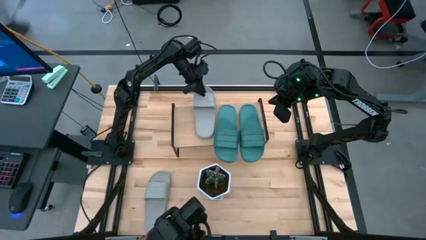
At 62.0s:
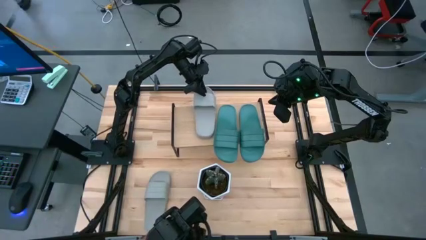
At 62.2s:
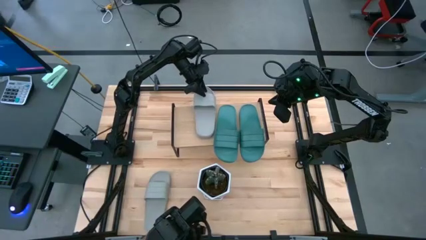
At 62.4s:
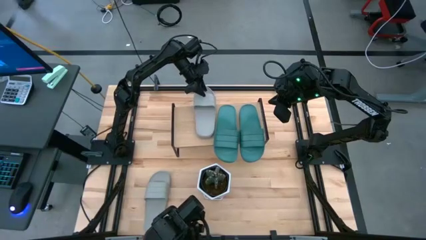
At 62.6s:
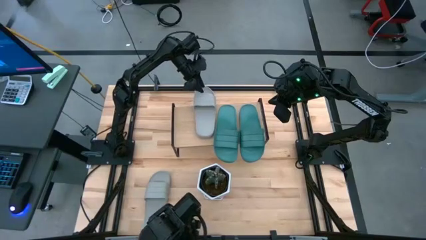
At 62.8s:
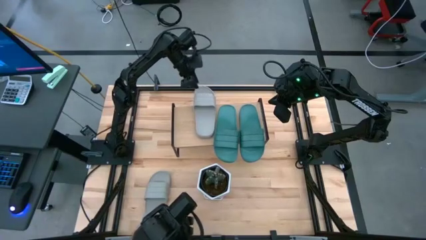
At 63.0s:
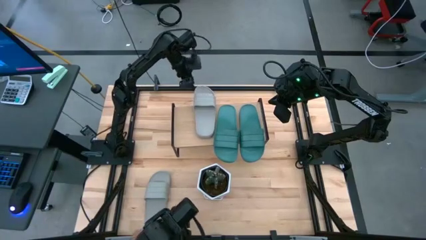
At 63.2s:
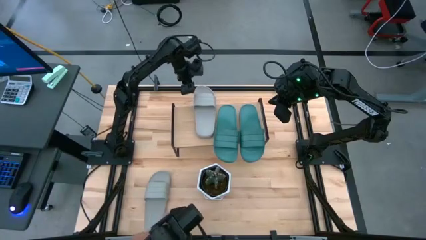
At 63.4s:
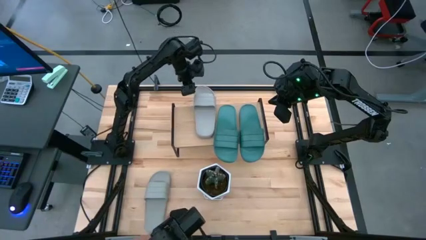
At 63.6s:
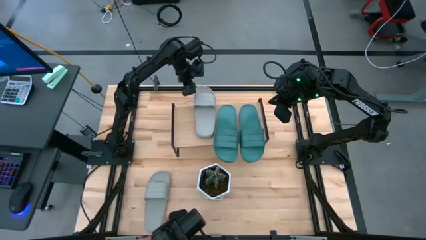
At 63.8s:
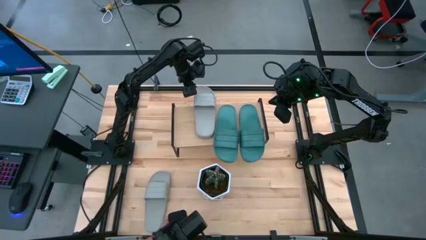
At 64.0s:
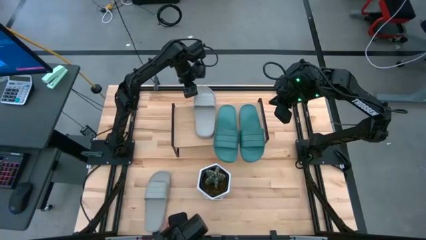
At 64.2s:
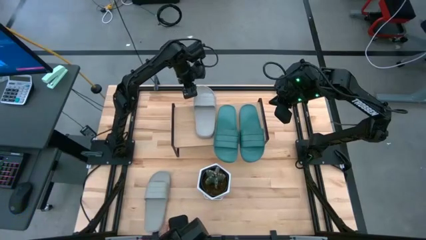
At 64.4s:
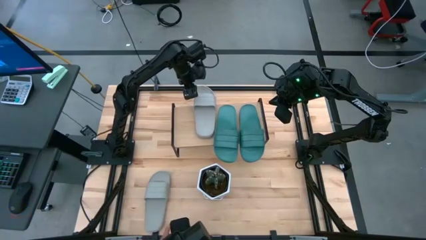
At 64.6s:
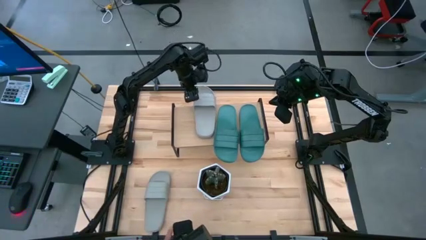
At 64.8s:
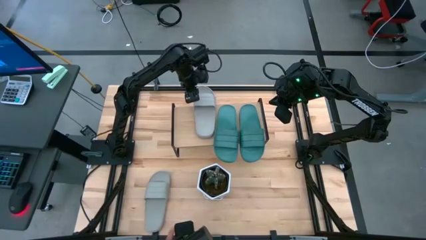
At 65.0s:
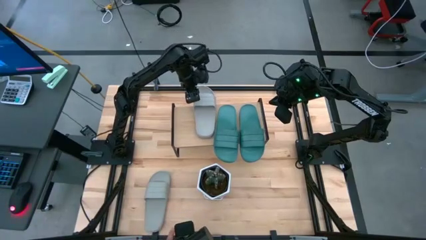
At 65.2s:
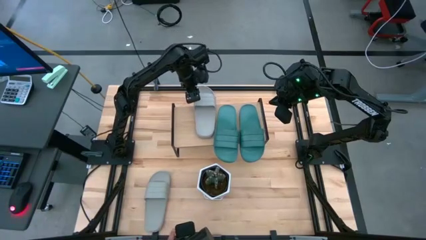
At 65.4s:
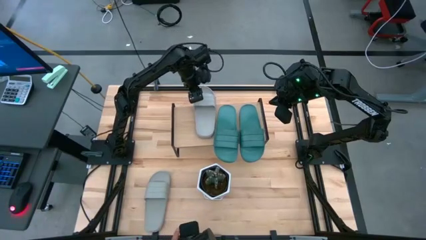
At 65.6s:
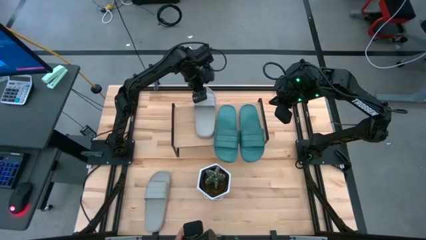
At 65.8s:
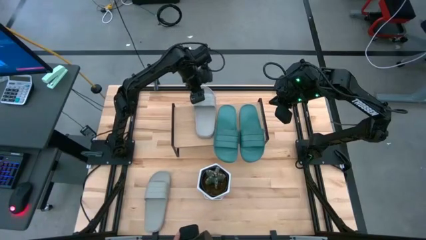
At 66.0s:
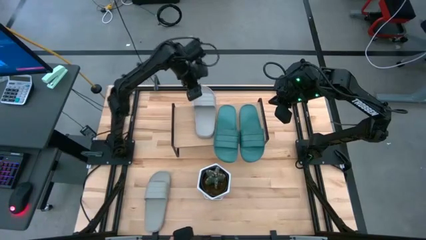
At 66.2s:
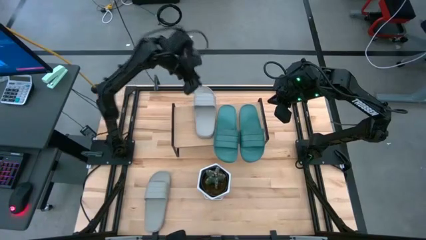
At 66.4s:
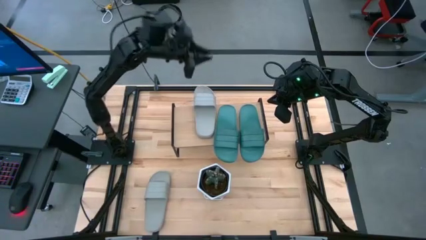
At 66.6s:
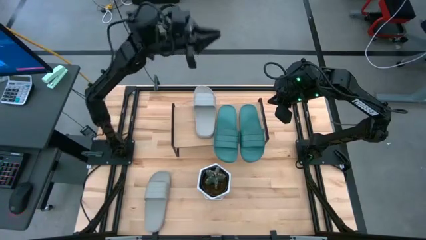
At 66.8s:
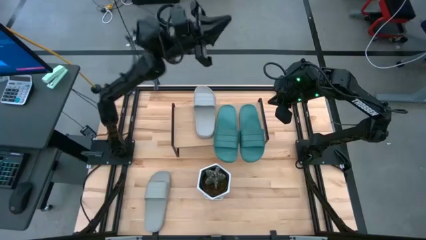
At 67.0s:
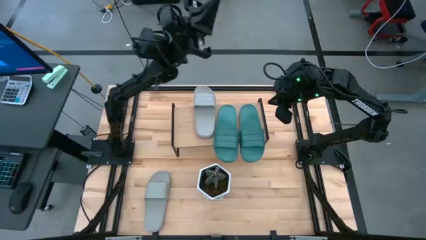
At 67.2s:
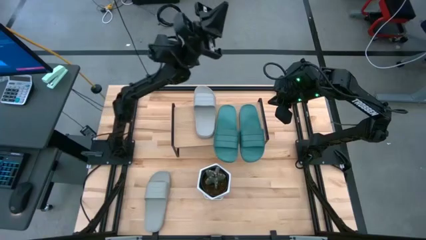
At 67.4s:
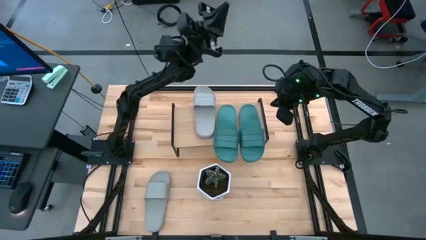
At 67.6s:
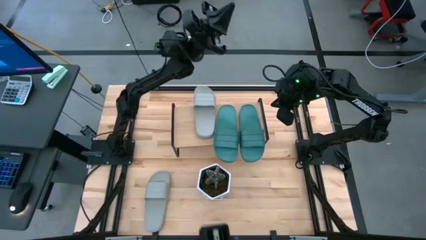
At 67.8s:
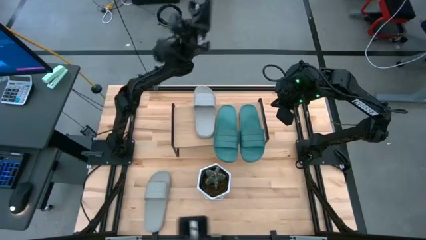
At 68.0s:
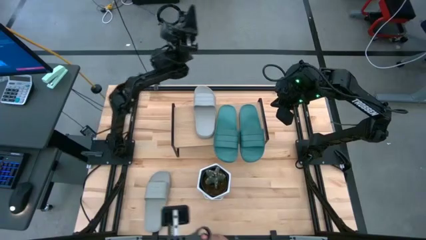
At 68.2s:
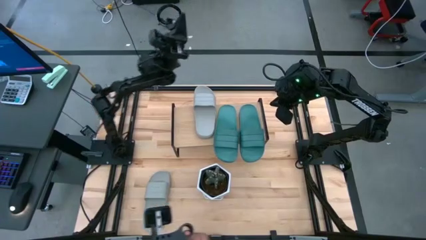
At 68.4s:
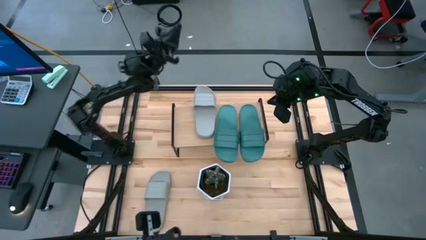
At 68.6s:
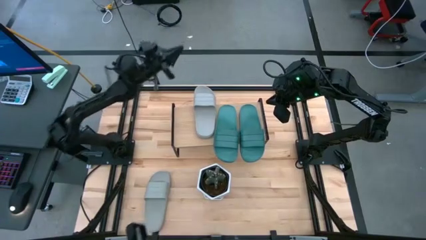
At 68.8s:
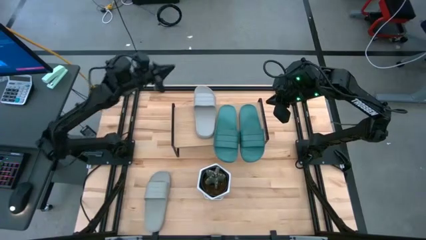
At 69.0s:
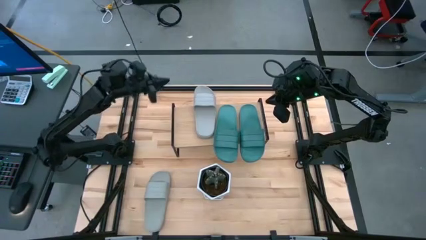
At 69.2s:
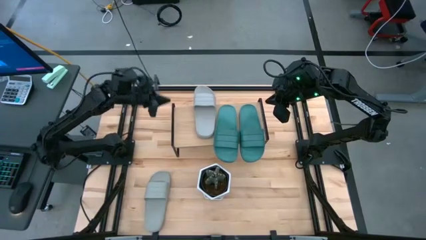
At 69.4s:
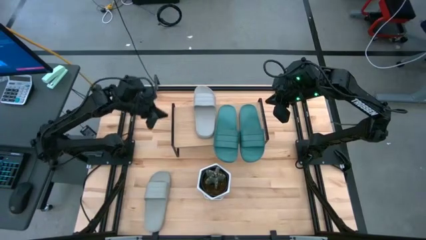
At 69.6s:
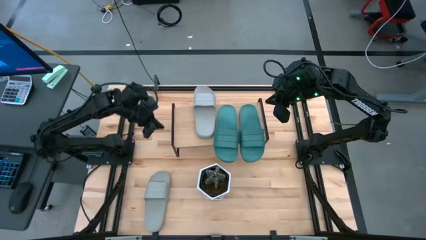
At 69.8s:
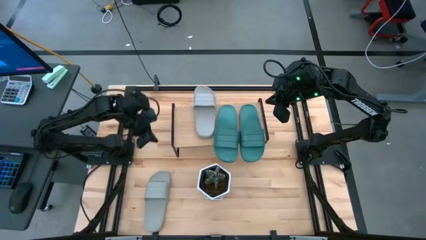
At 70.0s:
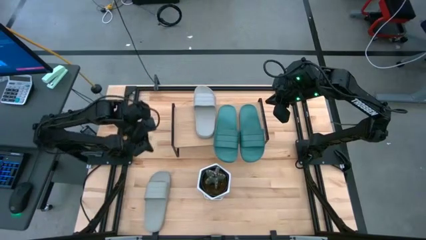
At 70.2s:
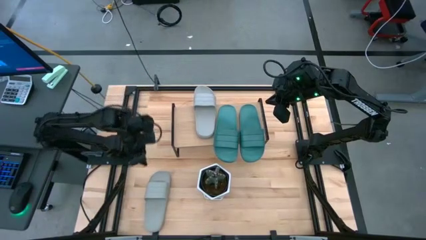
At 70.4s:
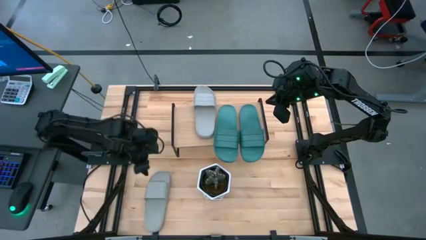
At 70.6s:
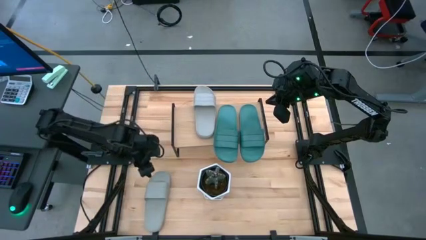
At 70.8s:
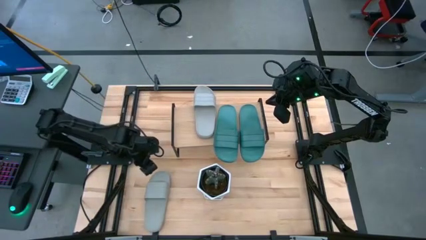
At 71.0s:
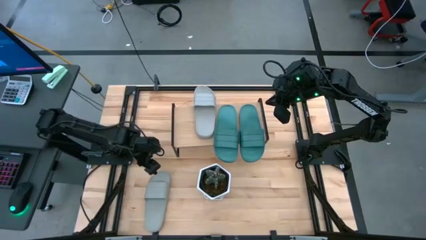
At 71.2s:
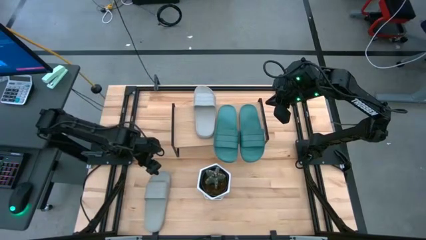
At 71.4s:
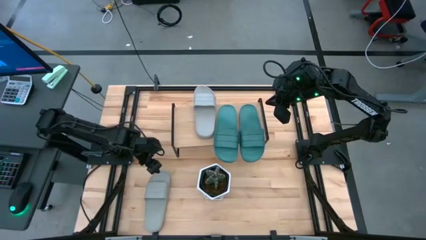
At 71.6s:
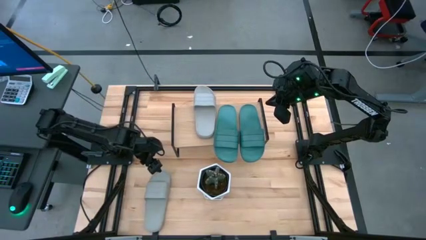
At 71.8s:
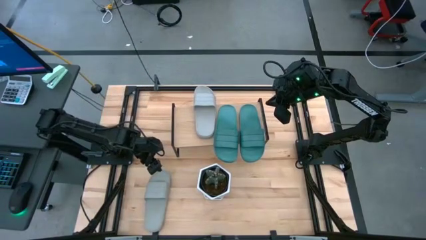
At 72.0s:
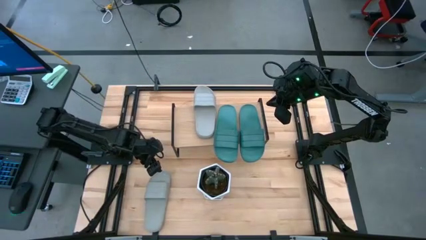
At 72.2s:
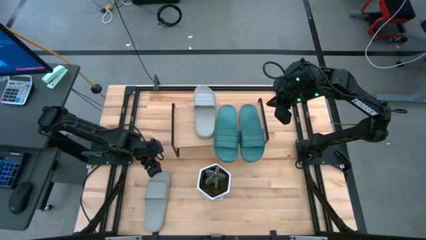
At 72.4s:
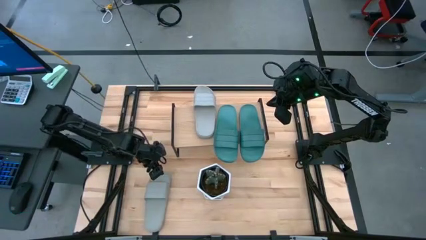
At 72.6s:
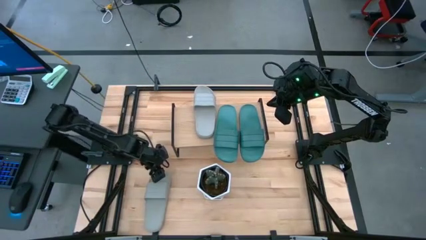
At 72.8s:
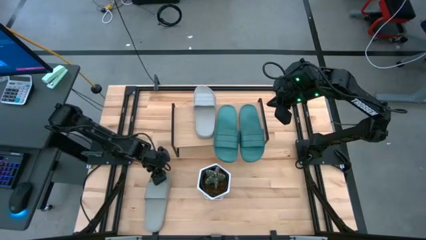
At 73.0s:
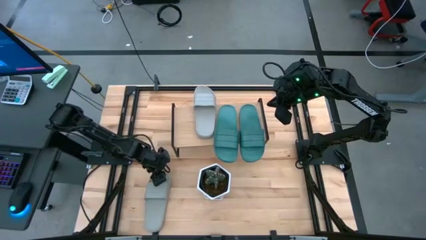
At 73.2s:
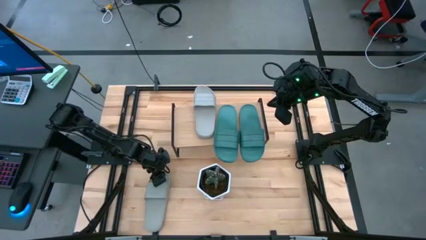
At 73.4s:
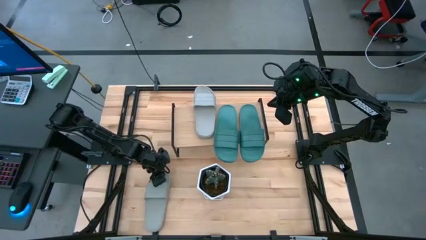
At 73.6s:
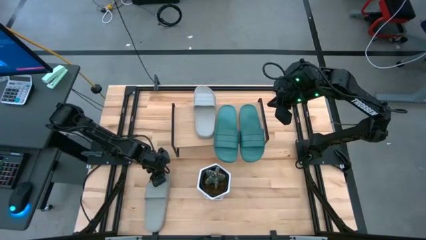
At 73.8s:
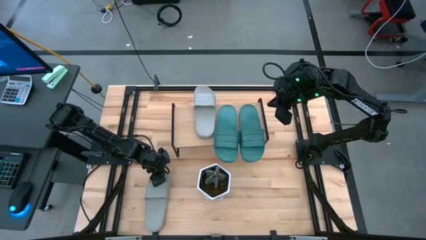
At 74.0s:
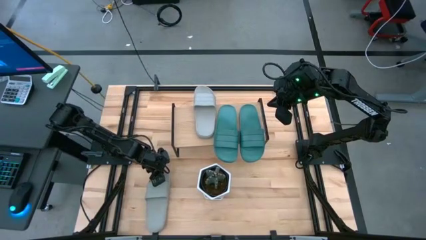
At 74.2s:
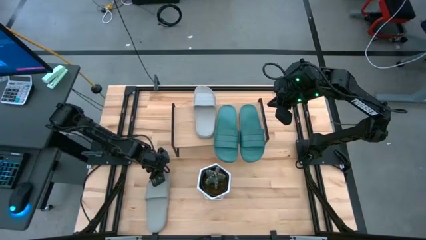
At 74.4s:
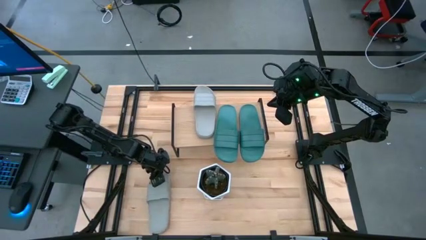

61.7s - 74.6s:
Task: Pick and place slides into the shelf
Put the gray slide on the shelf

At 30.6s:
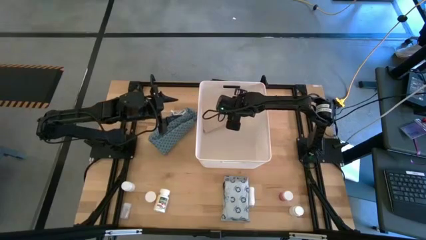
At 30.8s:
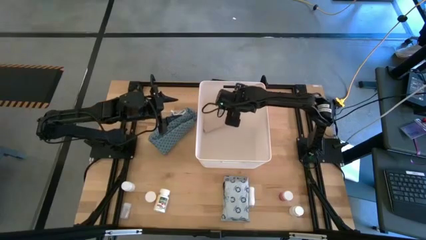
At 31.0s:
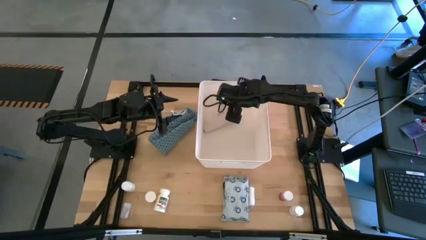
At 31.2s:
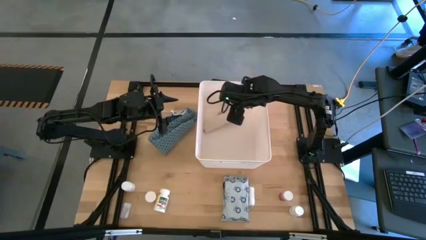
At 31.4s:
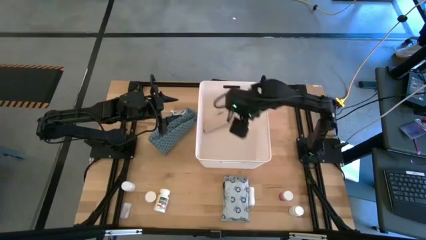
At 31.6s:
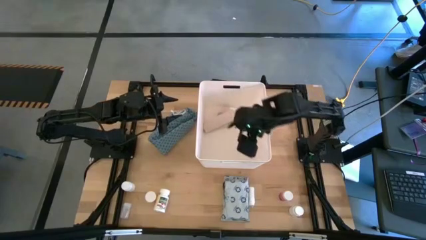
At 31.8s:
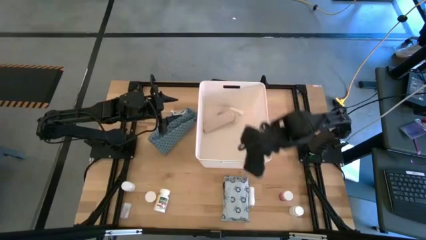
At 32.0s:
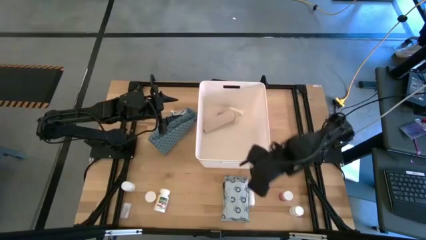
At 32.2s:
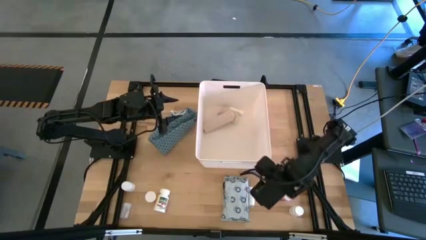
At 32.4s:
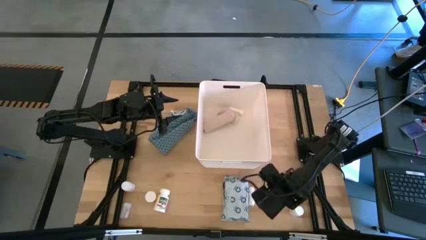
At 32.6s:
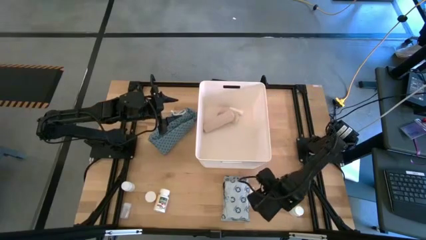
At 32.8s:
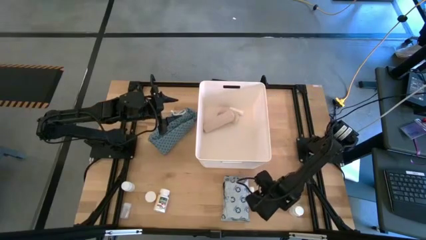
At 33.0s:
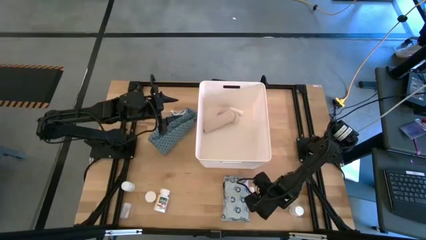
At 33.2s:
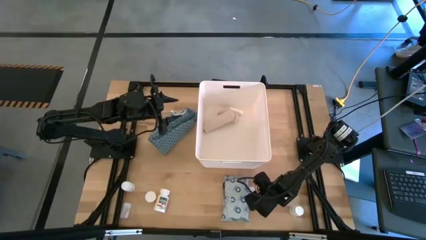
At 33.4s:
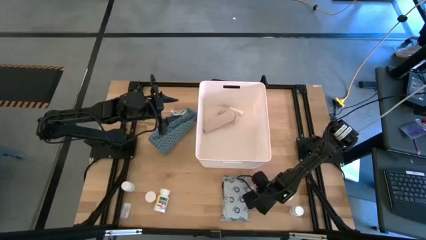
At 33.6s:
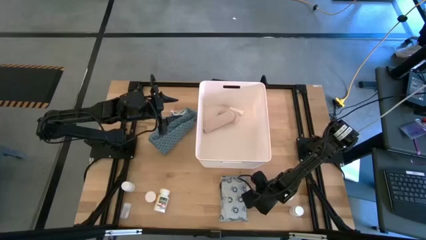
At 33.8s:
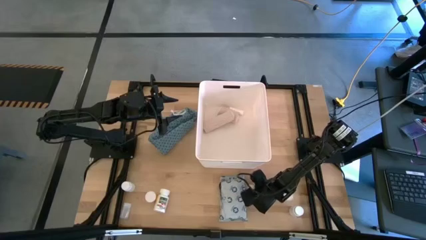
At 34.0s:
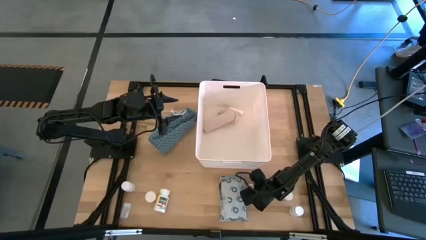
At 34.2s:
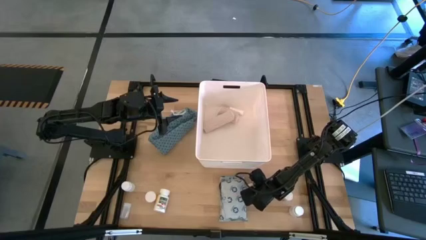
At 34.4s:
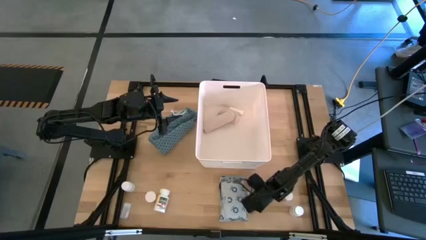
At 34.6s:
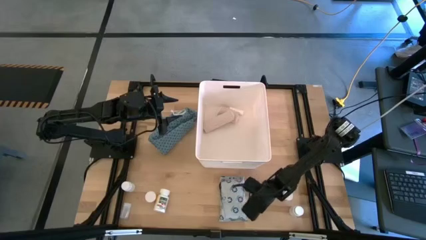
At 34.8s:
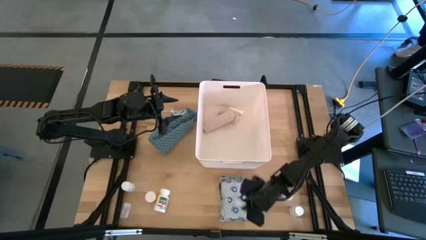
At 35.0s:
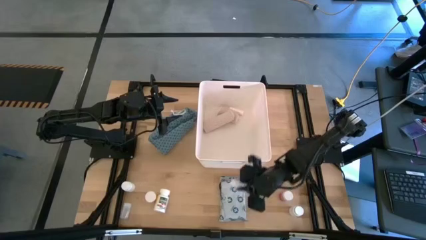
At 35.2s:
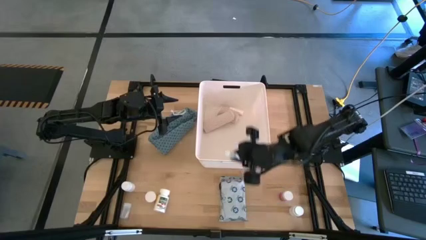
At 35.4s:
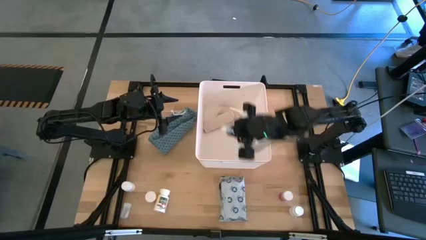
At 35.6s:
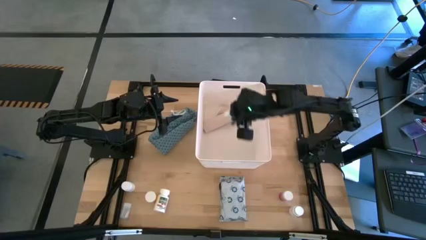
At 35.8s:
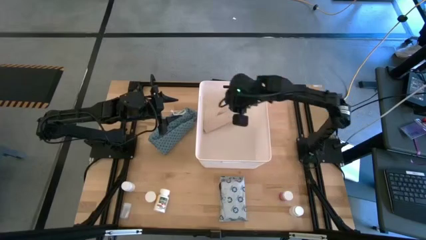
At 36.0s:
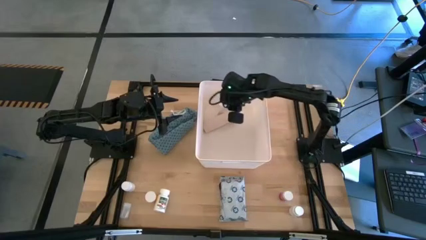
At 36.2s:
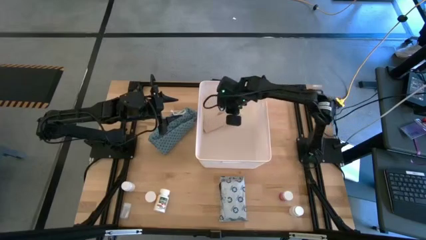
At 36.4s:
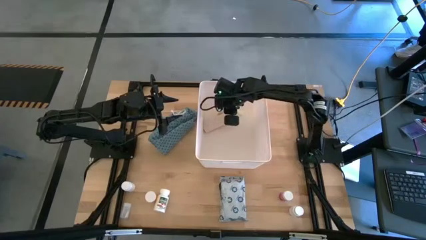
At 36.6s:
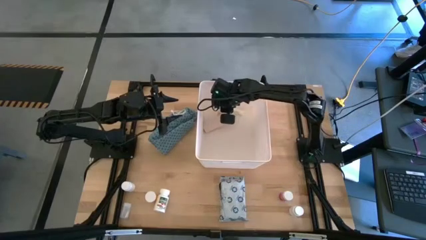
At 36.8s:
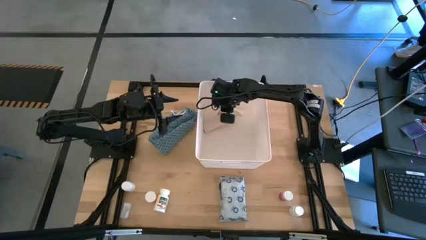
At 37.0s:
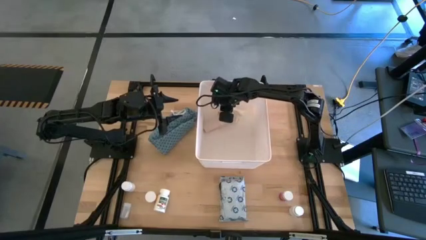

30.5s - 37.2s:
Task: Pick & place medical supplies in basket/bin
Put the white rolled gauze into the white bin
